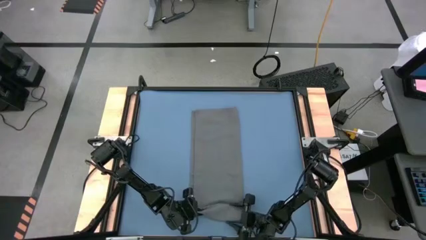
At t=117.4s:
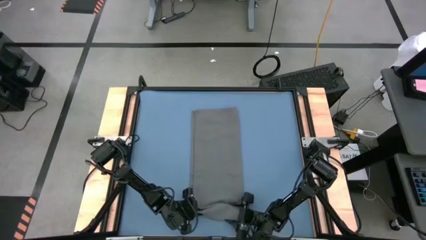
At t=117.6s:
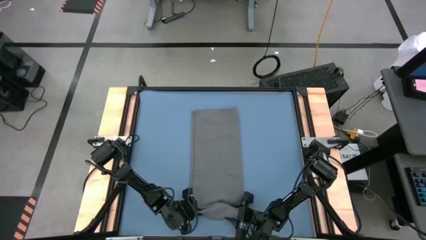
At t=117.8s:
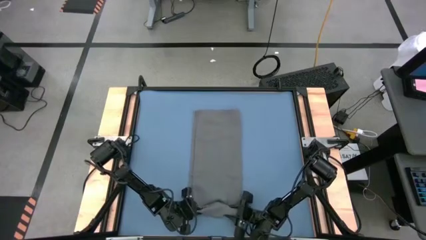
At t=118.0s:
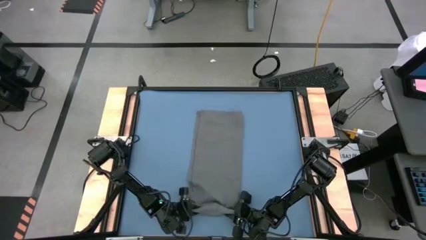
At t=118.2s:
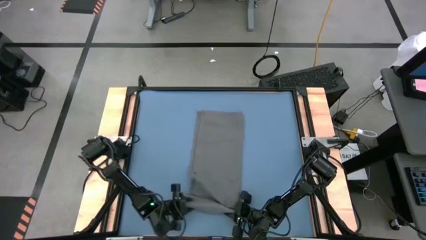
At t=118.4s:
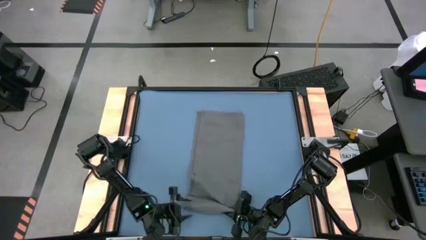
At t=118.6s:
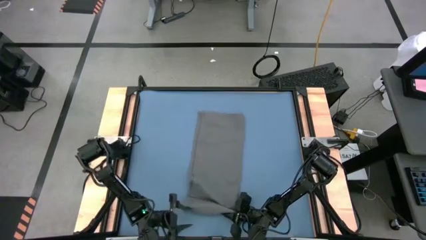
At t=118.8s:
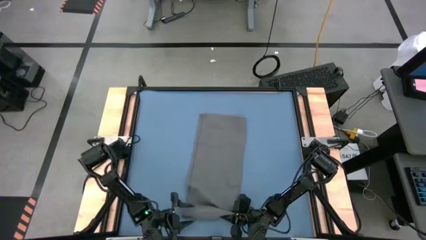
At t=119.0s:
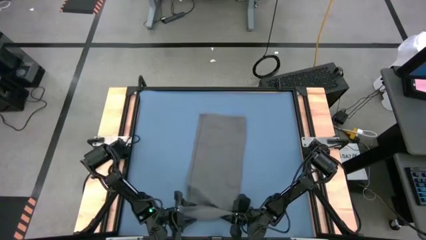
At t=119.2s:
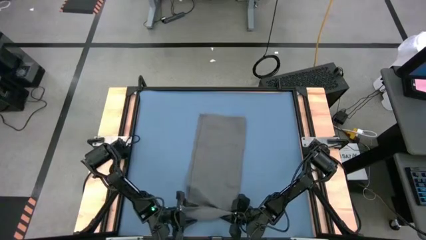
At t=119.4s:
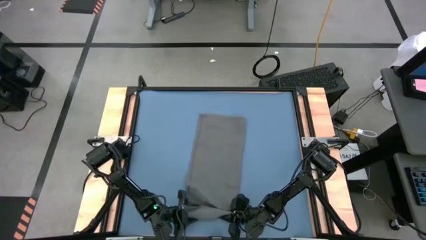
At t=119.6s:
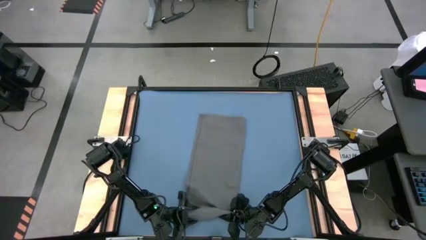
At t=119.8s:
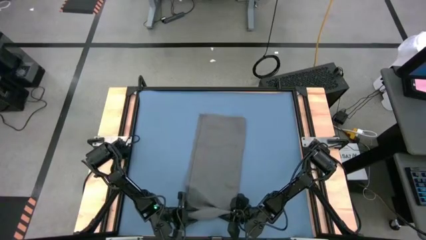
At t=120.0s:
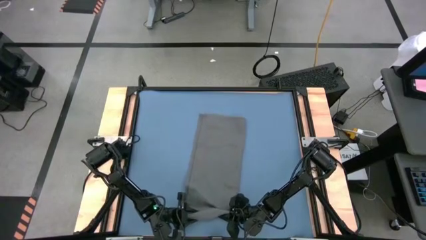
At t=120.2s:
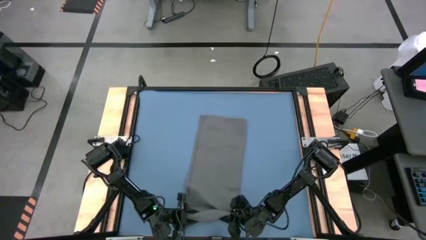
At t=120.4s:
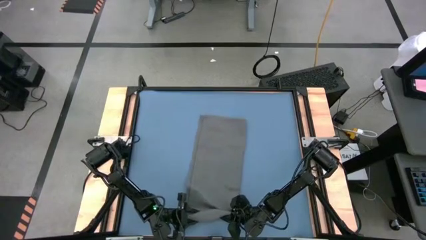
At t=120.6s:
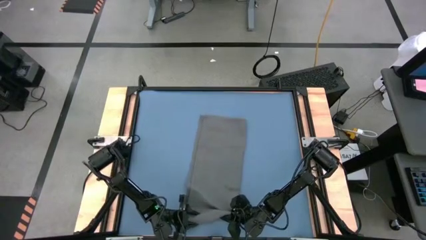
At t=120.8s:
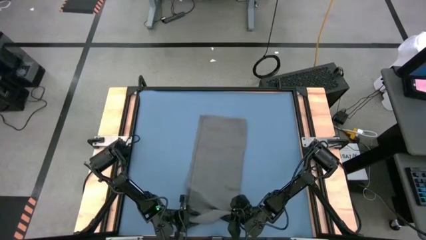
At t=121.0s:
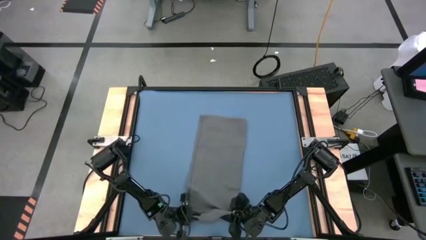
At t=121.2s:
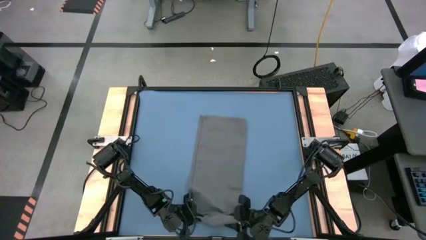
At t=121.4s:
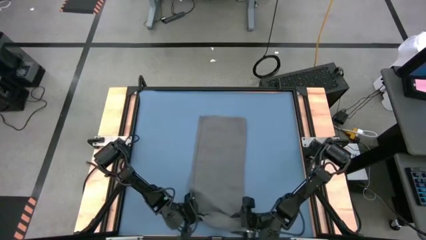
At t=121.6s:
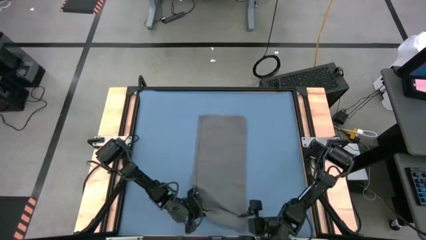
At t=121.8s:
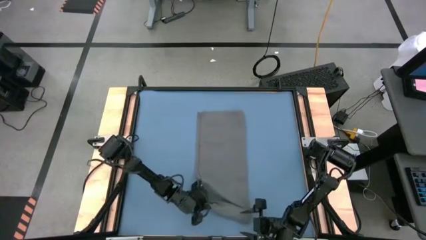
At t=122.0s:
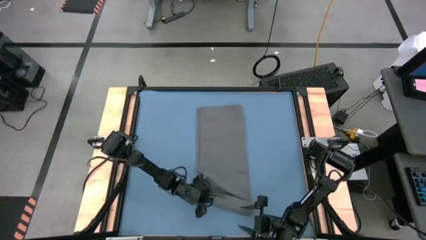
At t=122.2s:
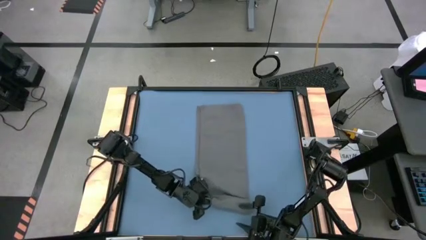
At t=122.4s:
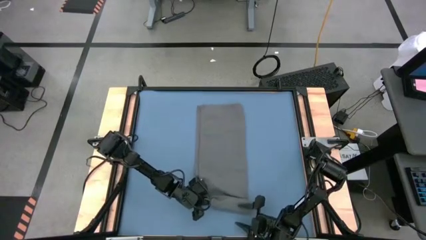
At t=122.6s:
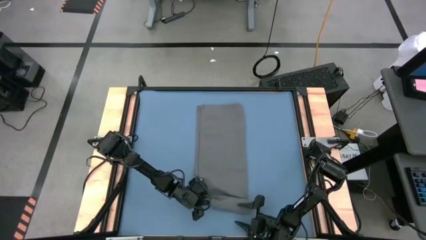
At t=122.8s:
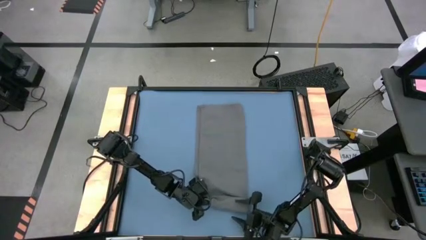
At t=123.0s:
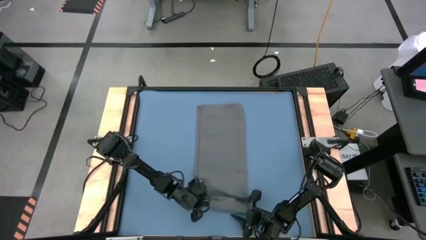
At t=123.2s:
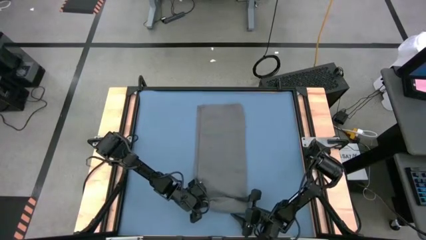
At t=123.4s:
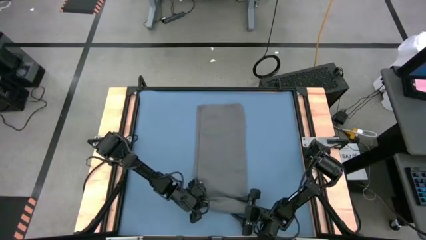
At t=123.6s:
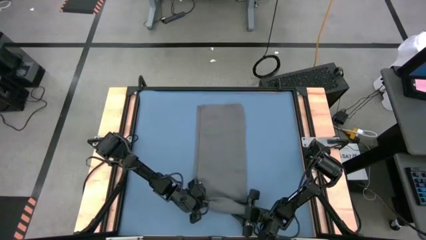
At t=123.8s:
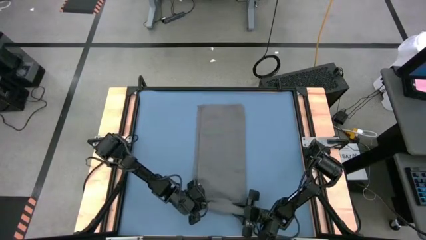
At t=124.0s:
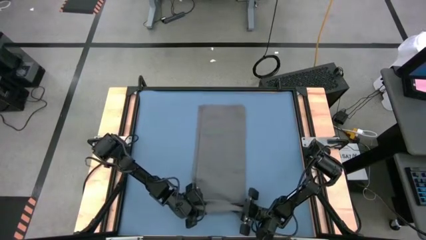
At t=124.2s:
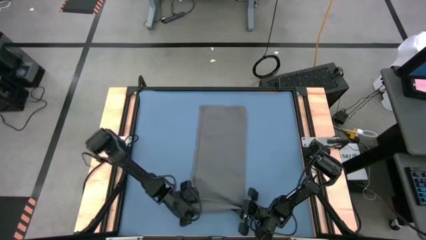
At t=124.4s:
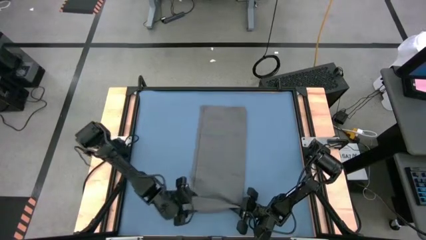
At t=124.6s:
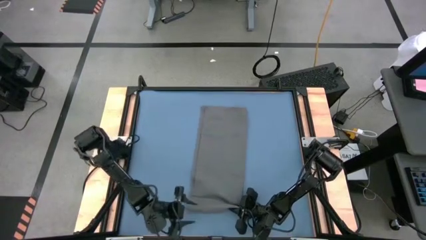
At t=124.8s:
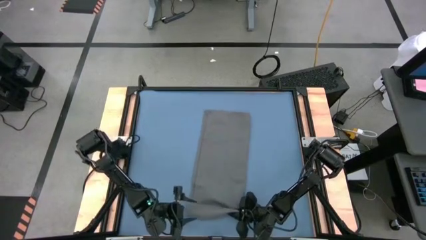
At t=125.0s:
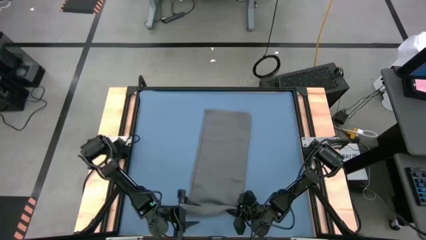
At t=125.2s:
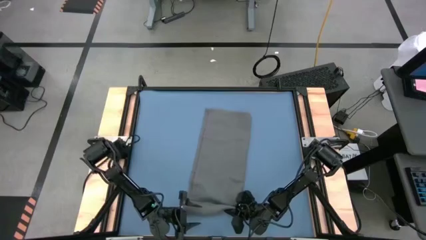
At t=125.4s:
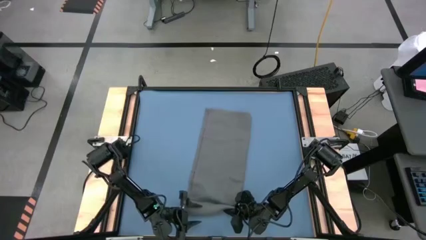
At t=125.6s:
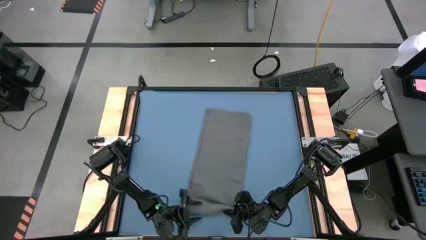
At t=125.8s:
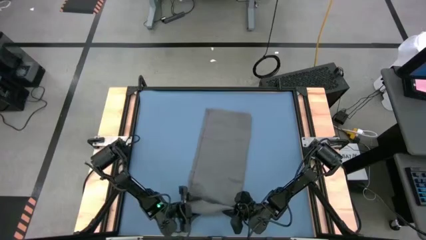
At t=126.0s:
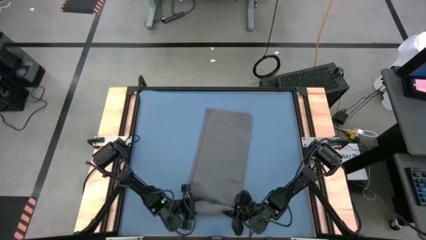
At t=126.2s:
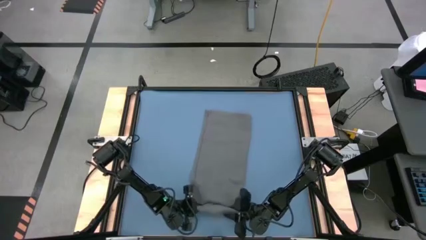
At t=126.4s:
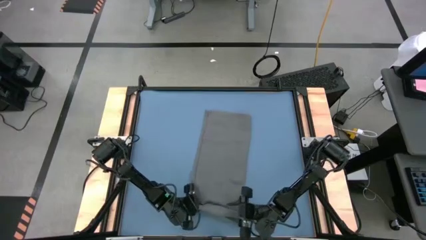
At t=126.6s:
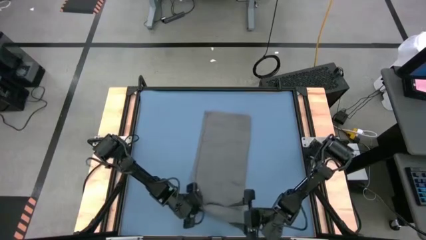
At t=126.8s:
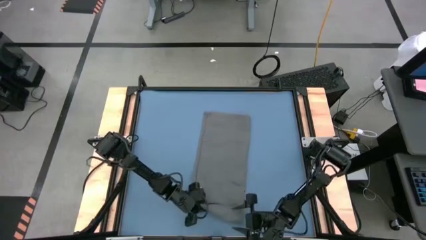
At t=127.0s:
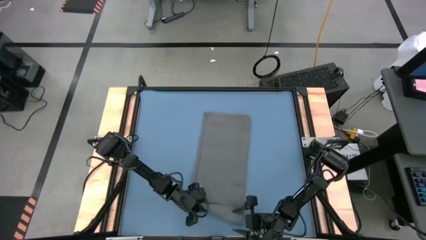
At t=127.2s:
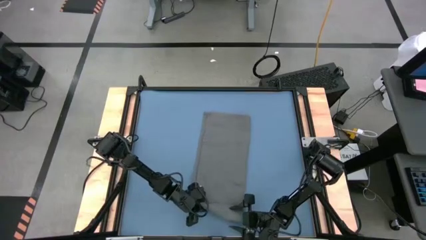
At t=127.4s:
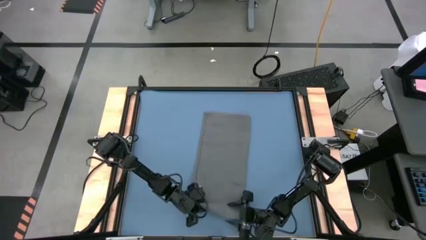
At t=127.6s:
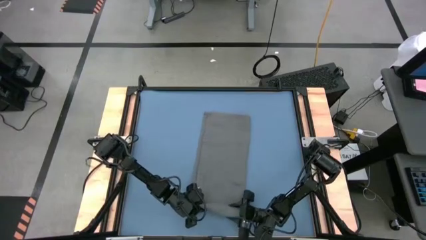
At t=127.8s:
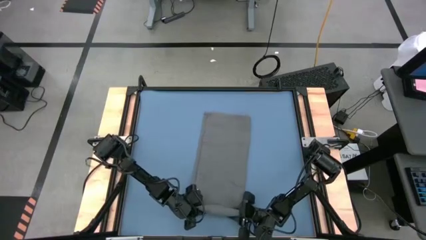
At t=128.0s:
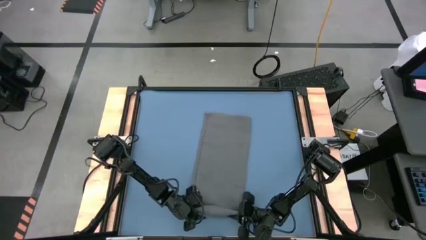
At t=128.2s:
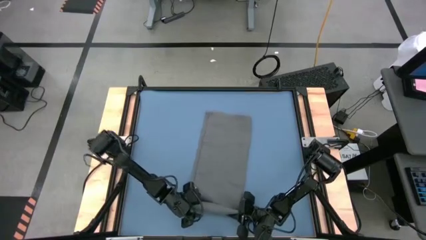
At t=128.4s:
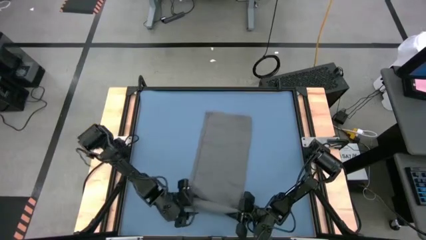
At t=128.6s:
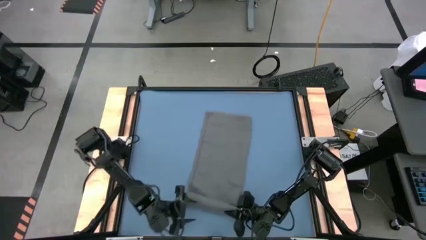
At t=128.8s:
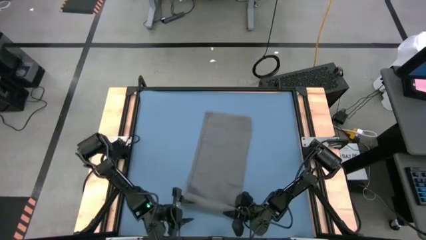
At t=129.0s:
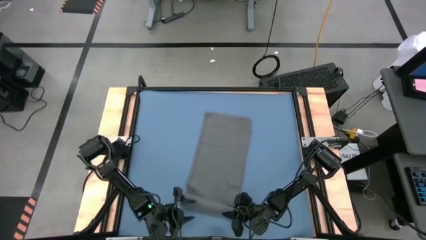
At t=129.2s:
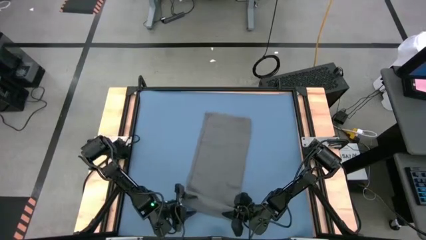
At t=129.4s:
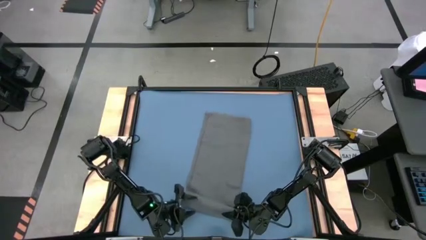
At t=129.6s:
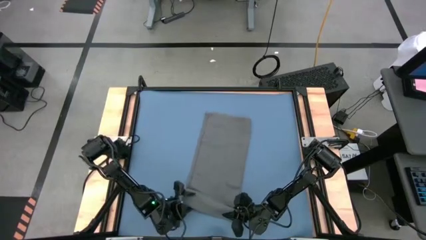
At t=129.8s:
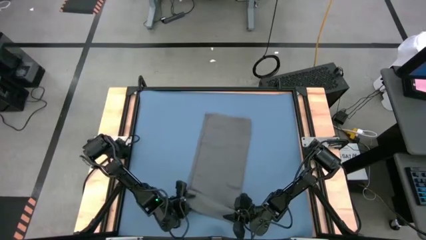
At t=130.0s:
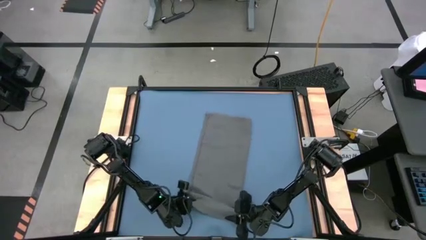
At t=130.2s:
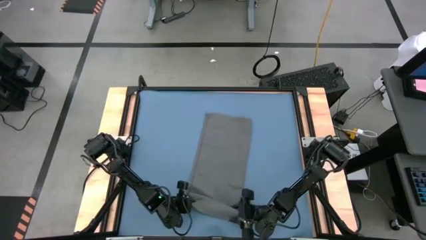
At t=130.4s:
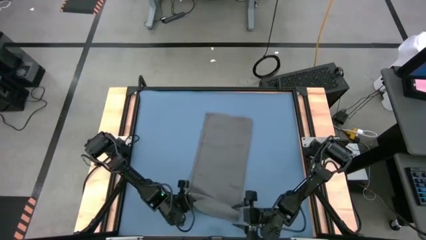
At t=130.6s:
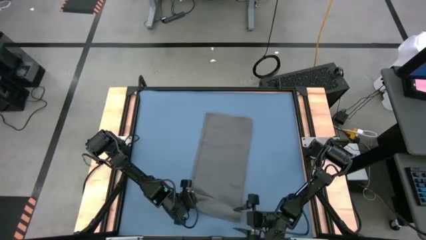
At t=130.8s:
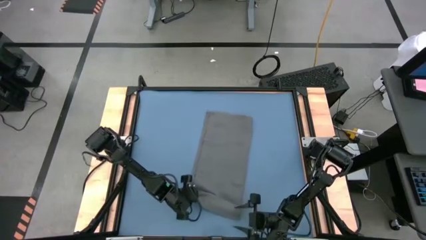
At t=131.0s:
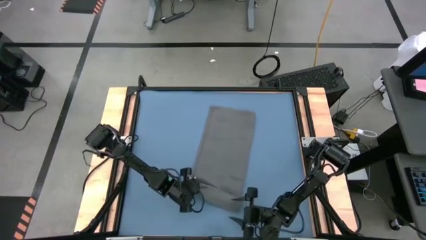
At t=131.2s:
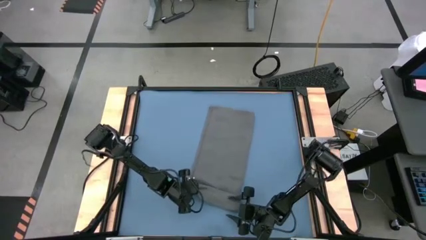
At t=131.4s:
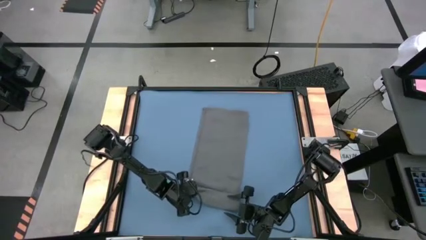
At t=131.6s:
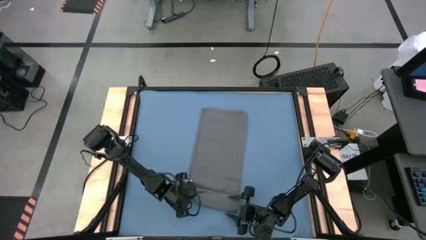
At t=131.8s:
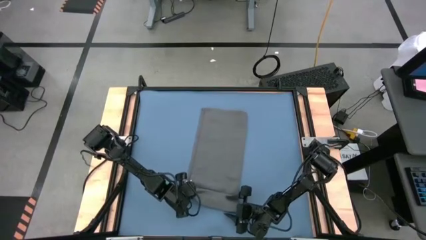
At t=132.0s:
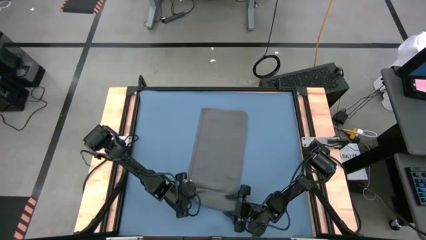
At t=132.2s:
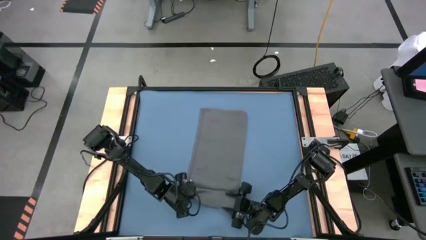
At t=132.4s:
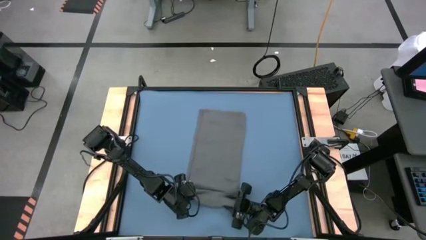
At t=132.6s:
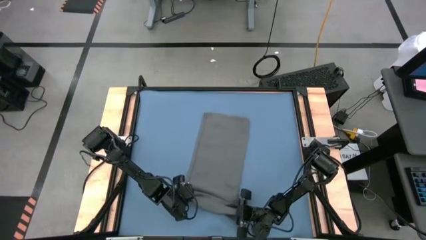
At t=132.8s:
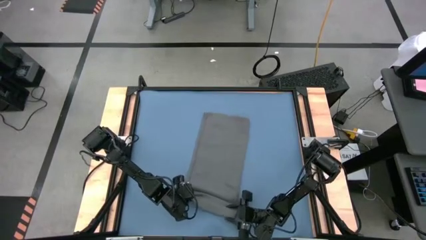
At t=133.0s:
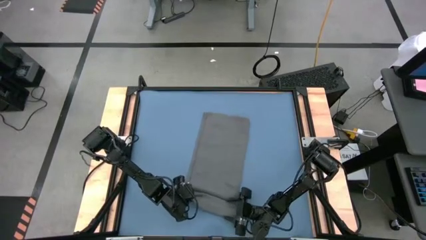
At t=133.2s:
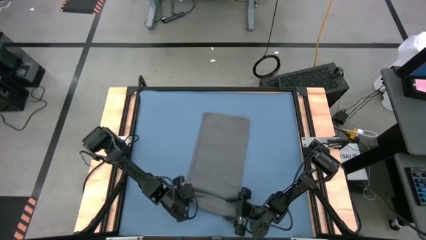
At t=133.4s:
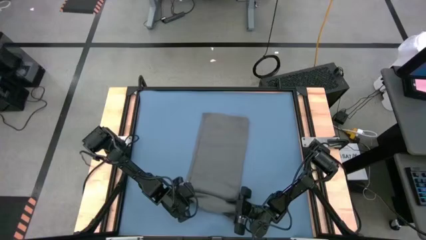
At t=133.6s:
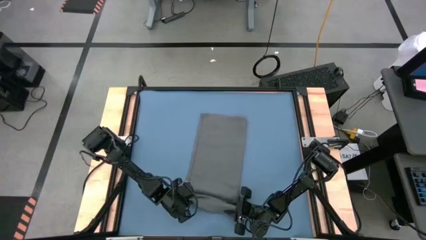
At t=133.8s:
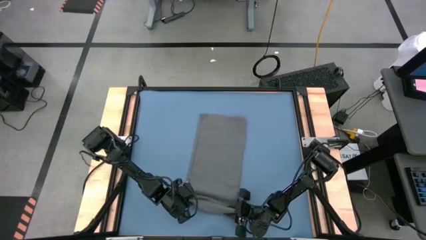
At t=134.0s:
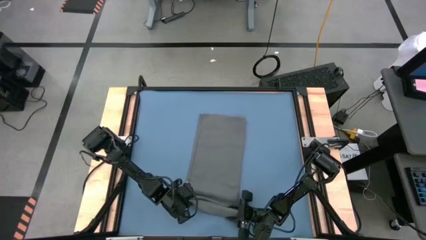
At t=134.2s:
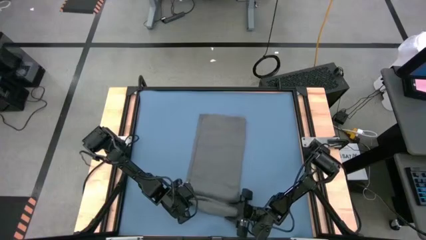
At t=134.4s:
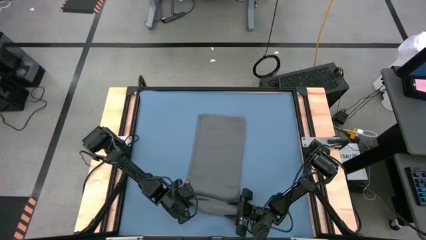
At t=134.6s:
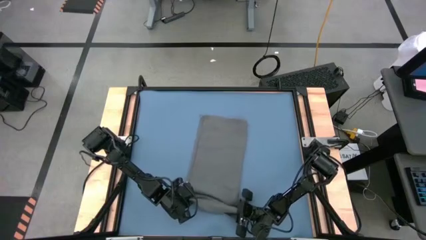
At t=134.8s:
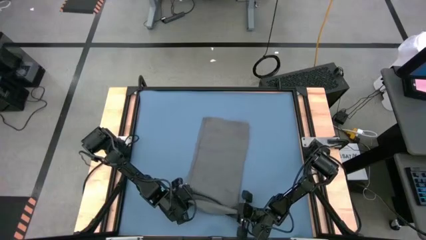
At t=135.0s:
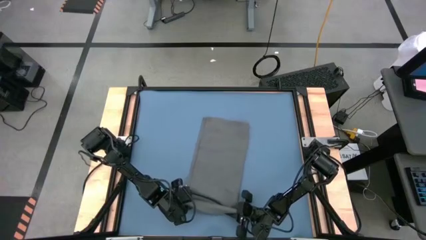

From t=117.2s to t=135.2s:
Task: Roll towel
Roll the gray towel
